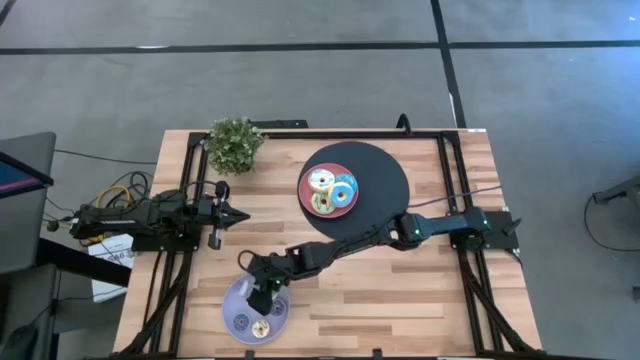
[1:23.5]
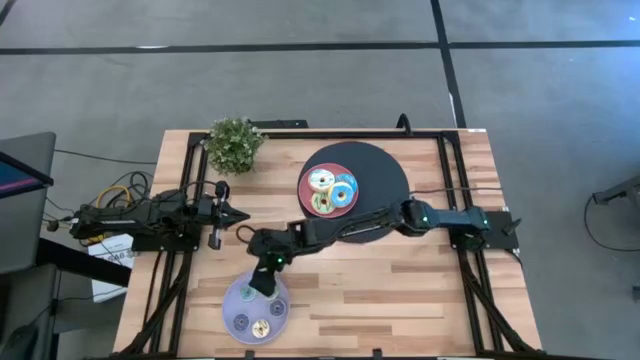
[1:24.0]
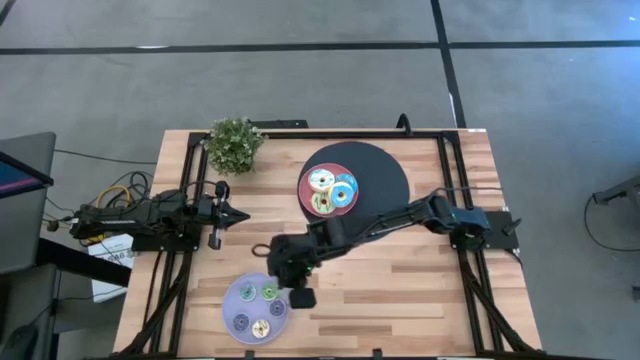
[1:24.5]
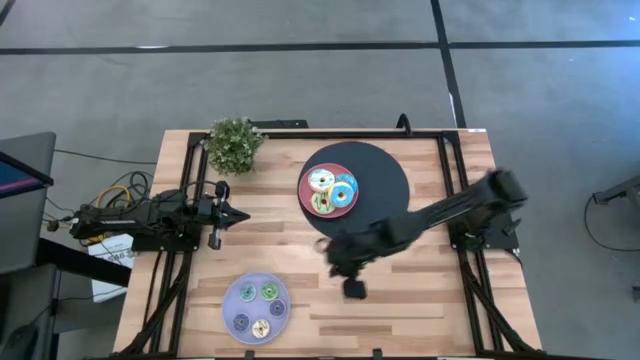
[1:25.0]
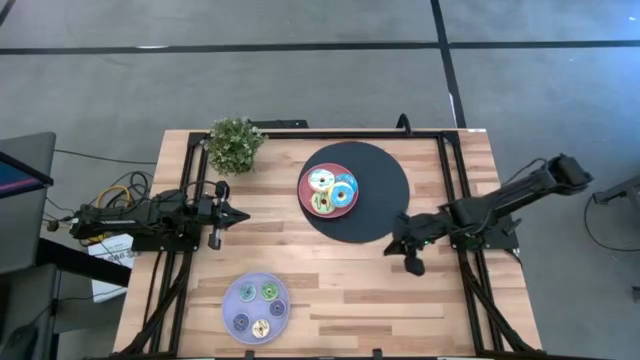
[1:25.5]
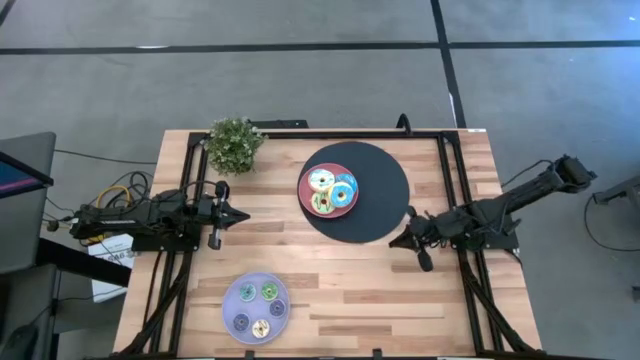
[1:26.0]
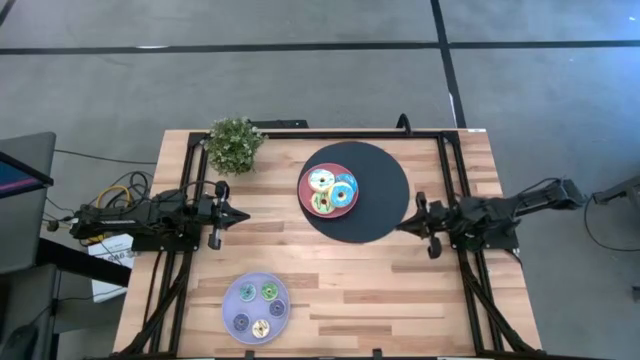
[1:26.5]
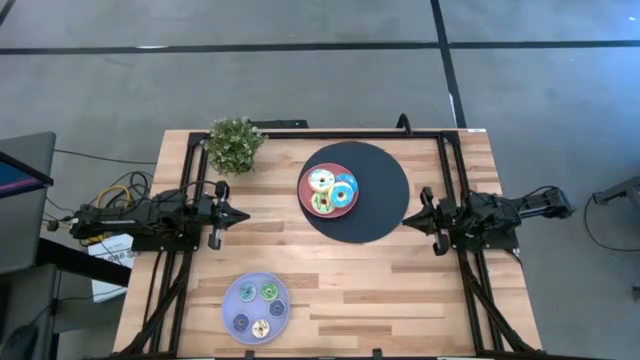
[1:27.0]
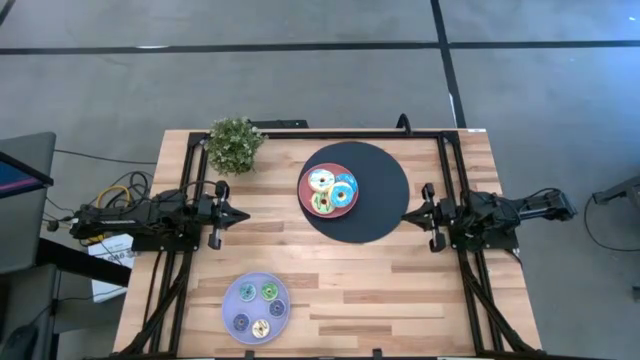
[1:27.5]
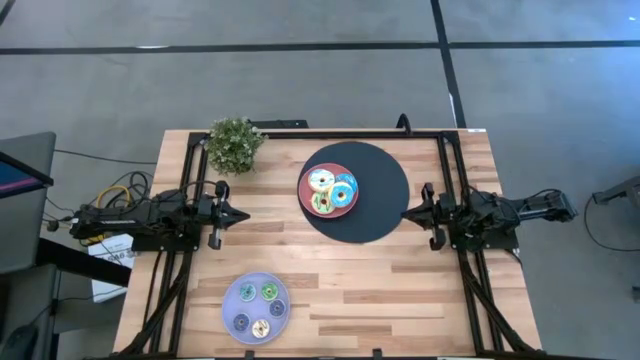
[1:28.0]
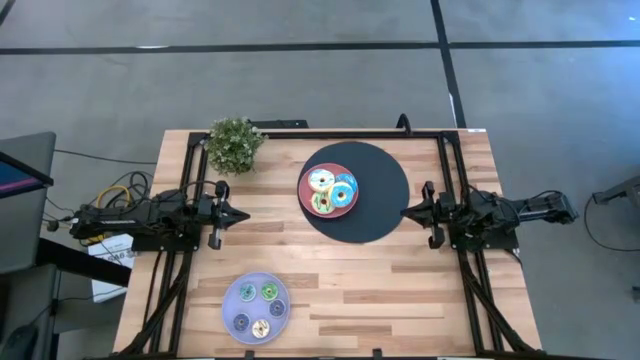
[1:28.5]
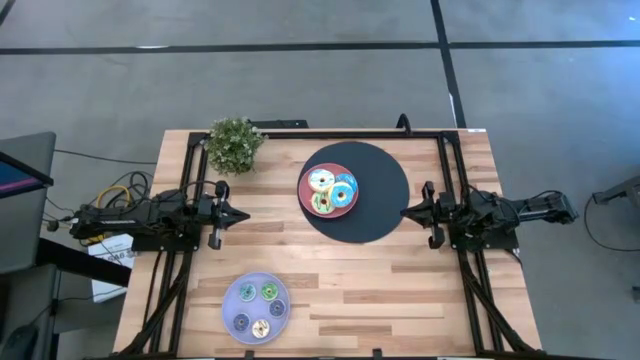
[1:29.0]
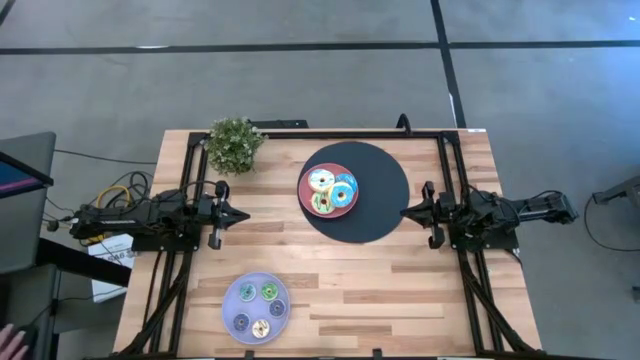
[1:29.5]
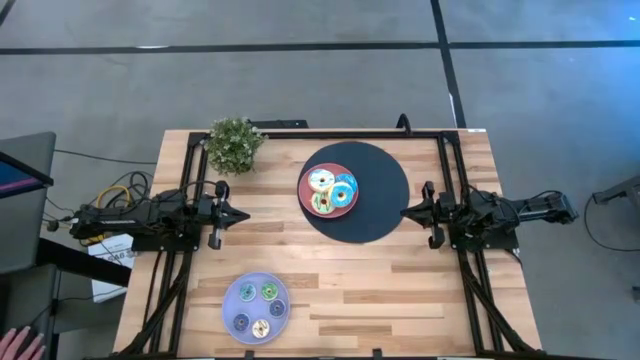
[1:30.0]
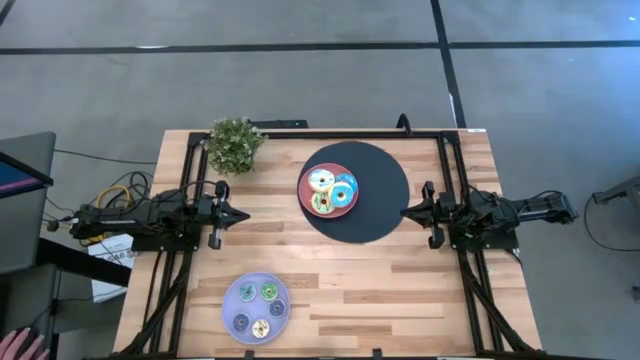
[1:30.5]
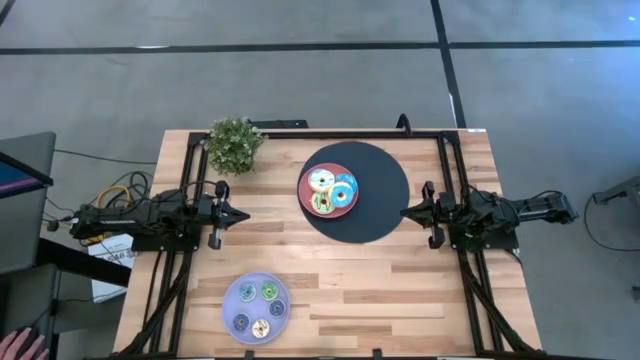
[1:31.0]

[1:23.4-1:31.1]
Task: Pick & Place donuts
Return to Home Position

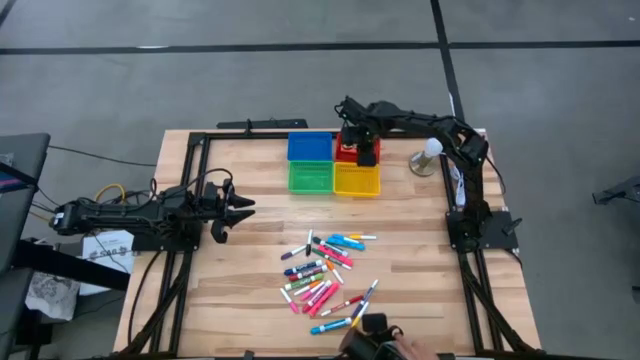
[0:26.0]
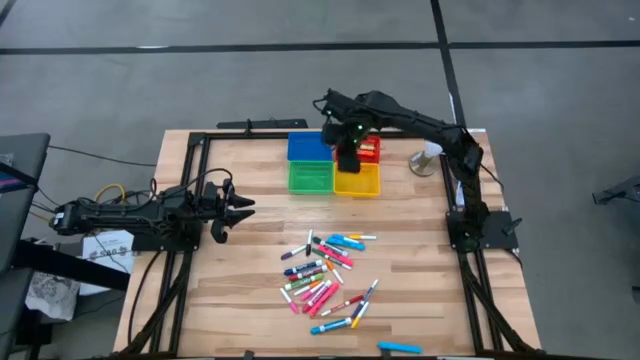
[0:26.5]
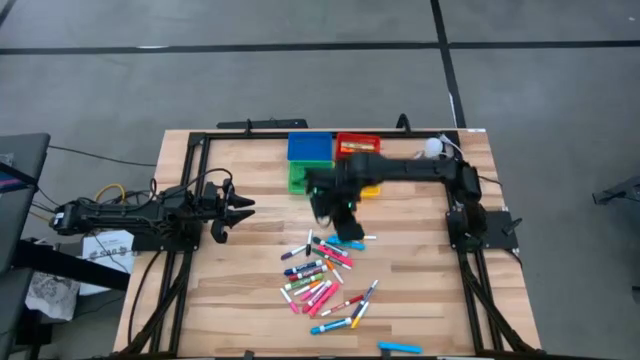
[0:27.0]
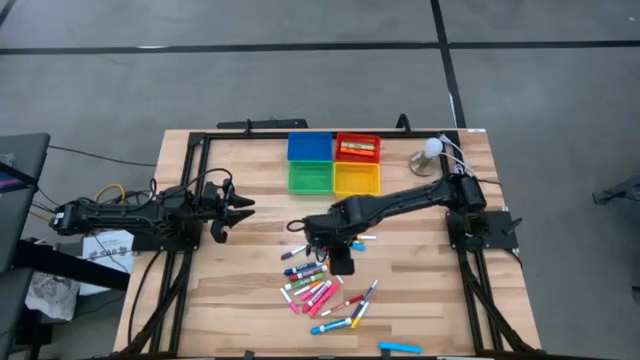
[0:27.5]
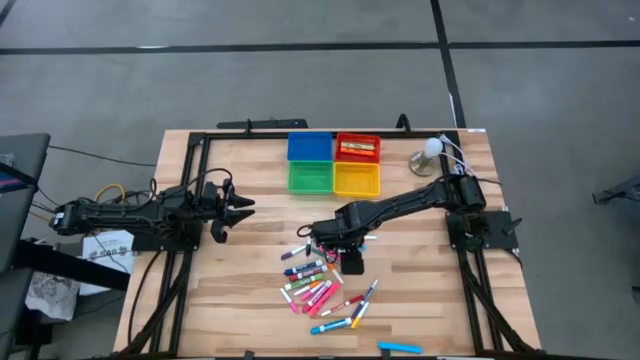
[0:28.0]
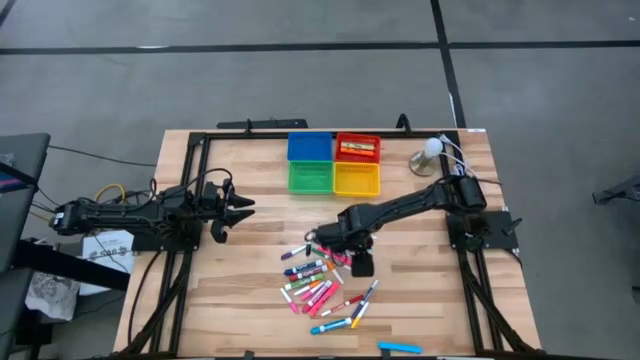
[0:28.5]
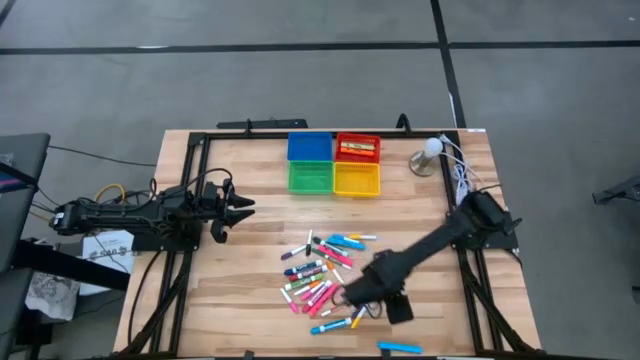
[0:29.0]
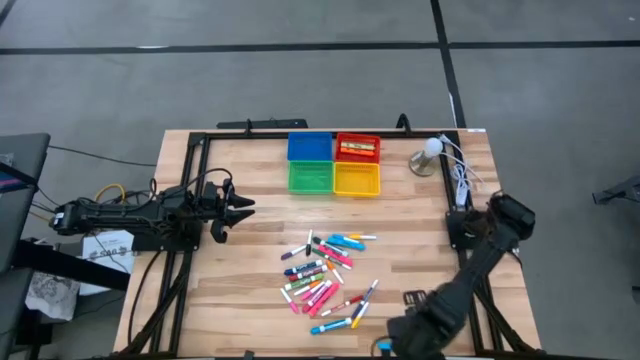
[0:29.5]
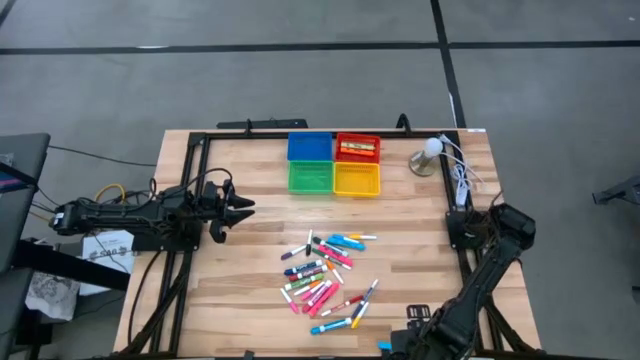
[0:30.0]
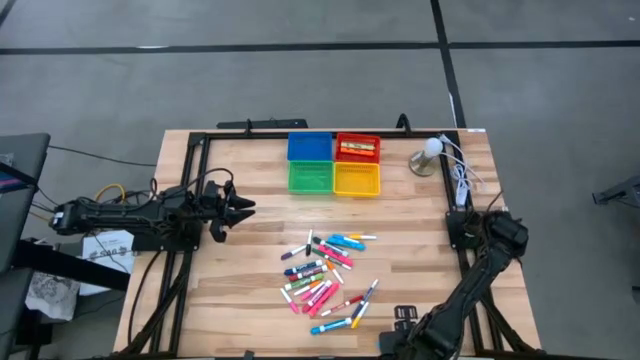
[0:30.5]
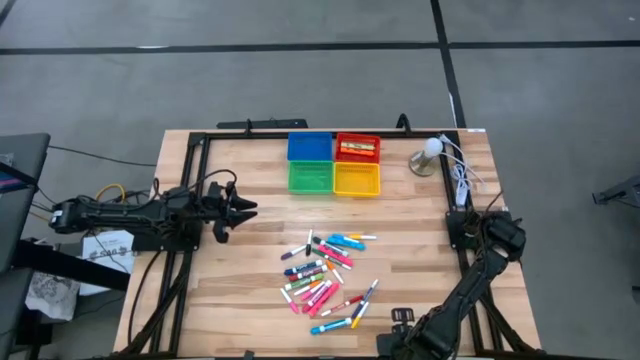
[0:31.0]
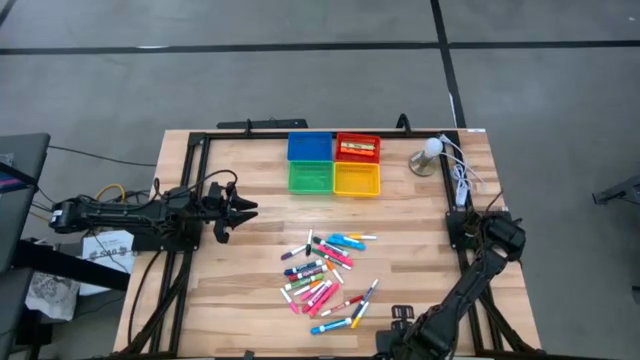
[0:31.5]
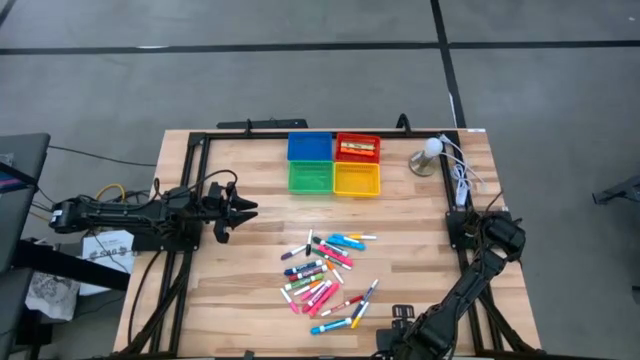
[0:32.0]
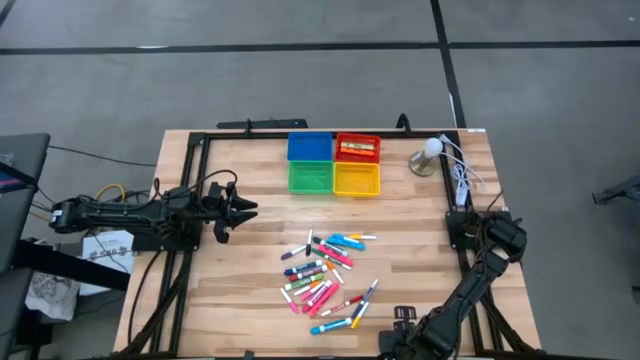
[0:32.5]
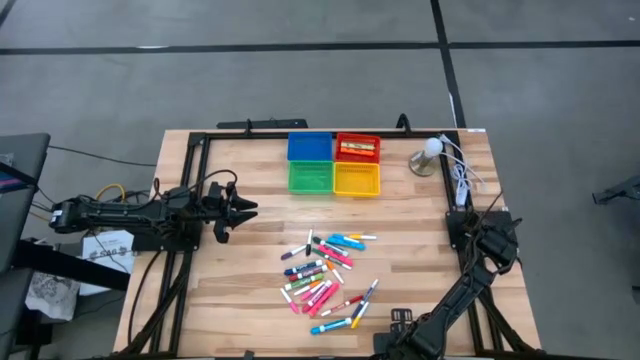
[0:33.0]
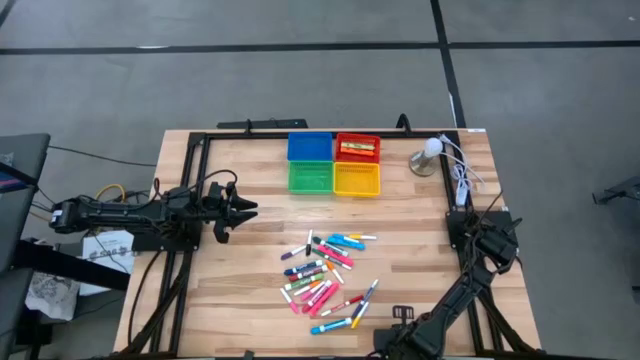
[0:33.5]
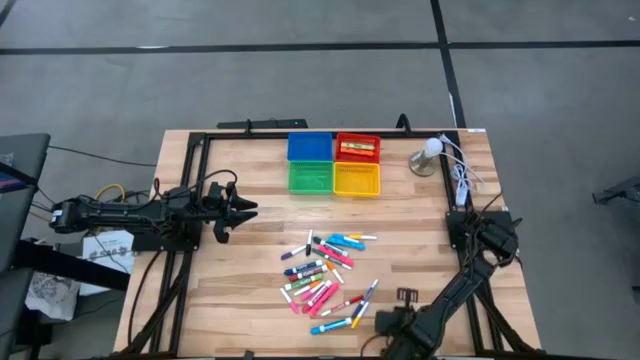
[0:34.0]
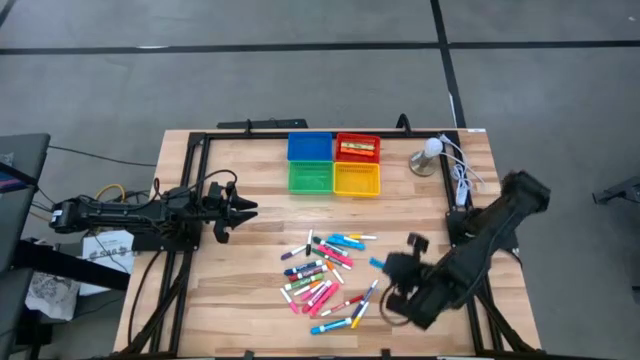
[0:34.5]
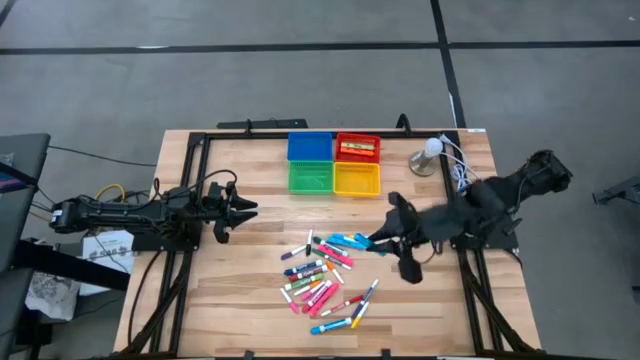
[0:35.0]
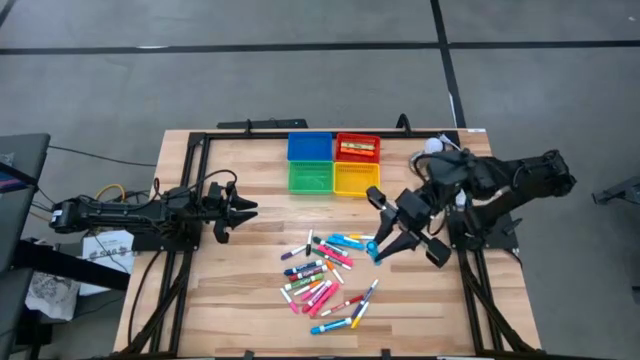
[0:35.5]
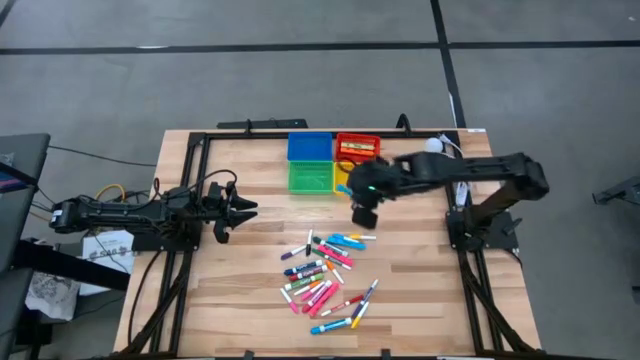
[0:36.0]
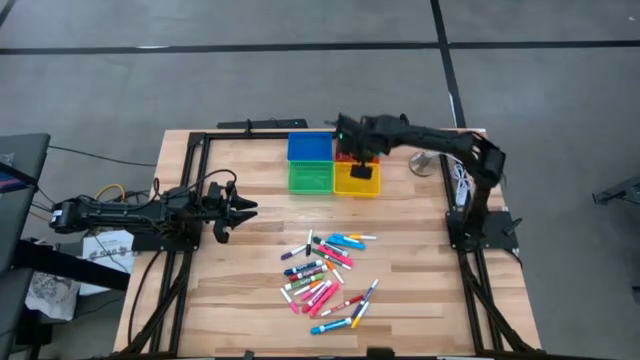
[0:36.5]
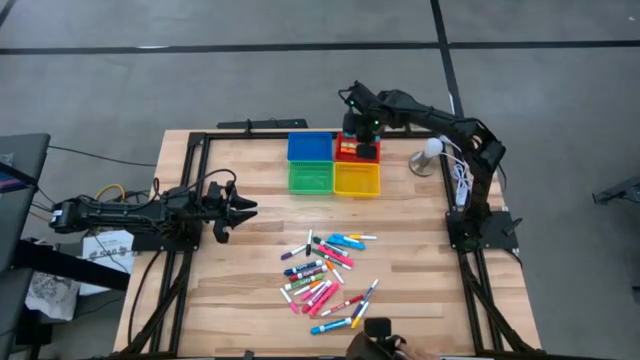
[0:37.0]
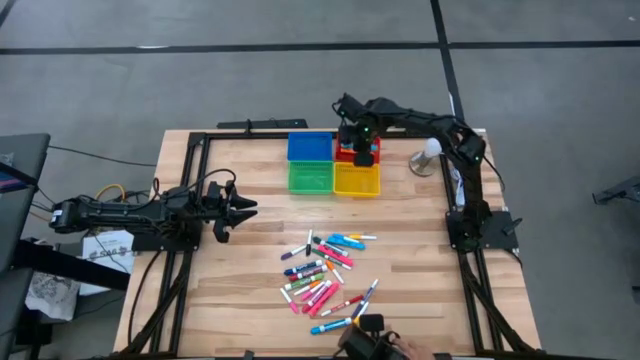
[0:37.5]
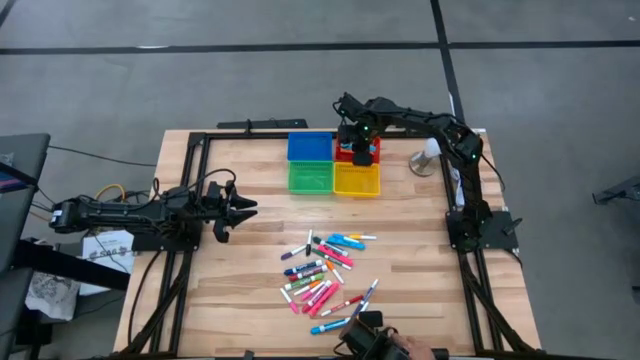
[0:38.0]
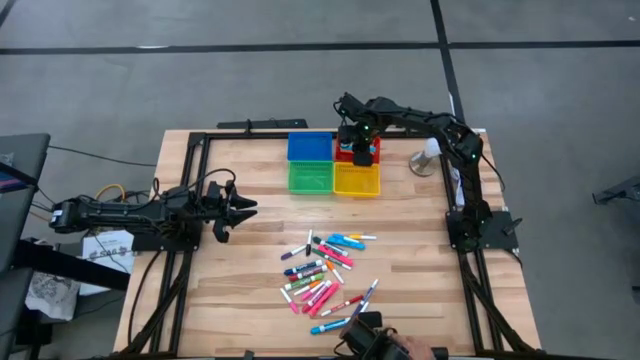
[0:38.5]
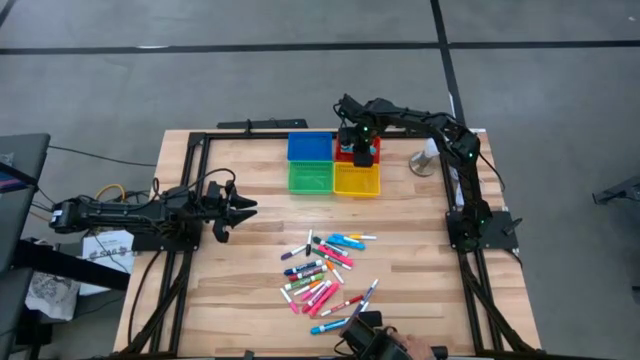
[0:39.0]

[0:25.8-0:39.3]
Task: Pick & Place Markers
Put the light blue marker in the red bin
